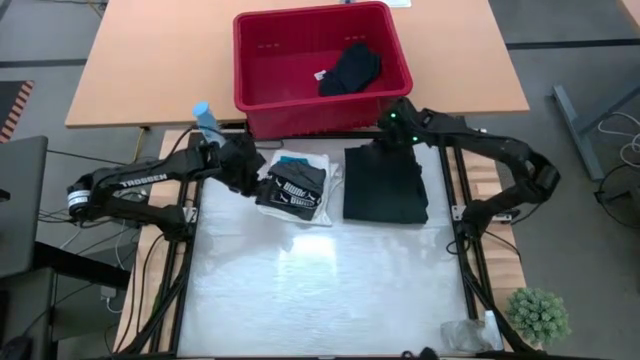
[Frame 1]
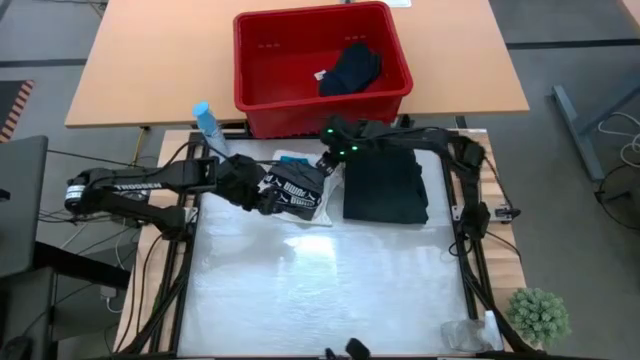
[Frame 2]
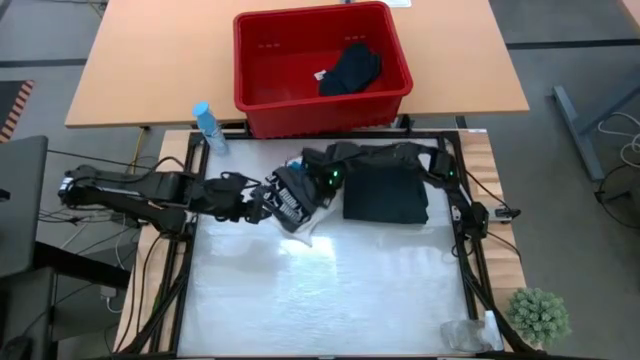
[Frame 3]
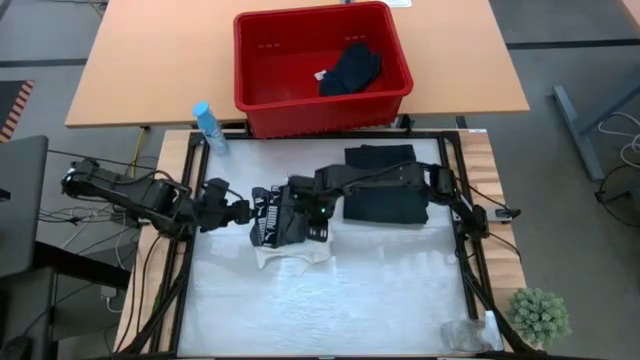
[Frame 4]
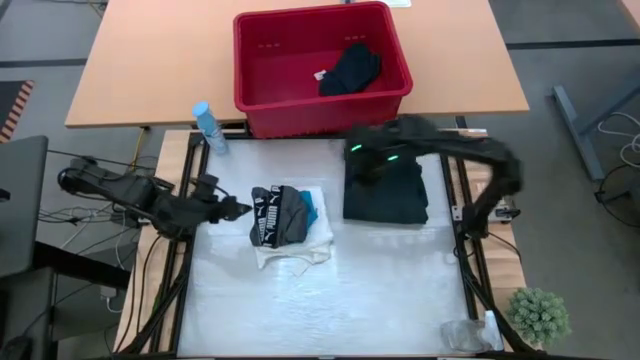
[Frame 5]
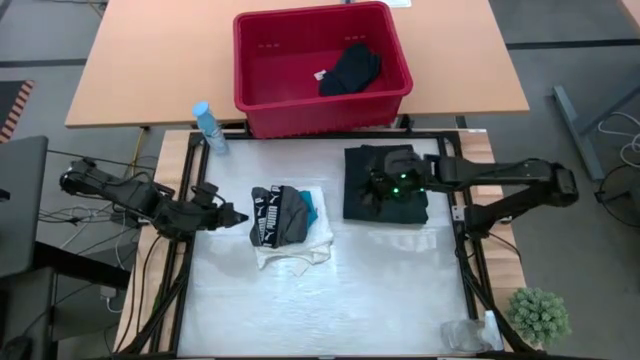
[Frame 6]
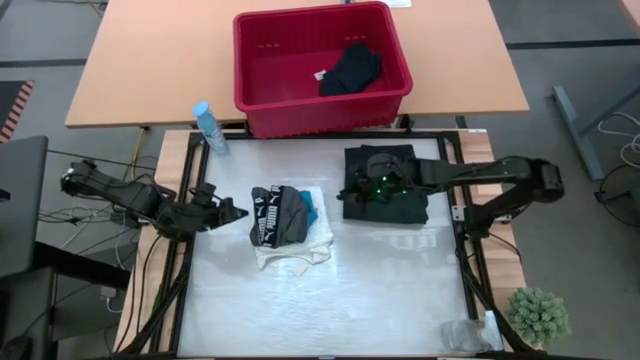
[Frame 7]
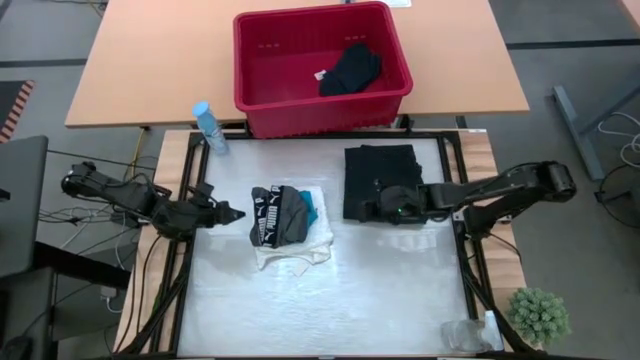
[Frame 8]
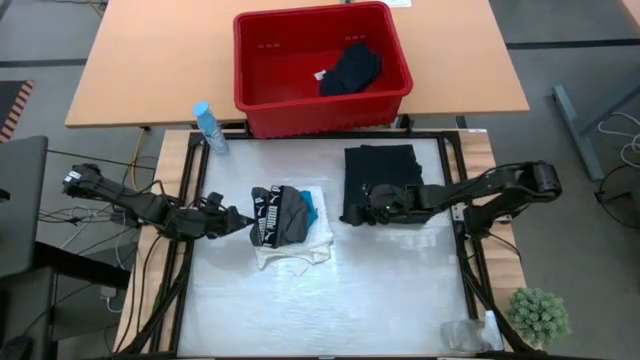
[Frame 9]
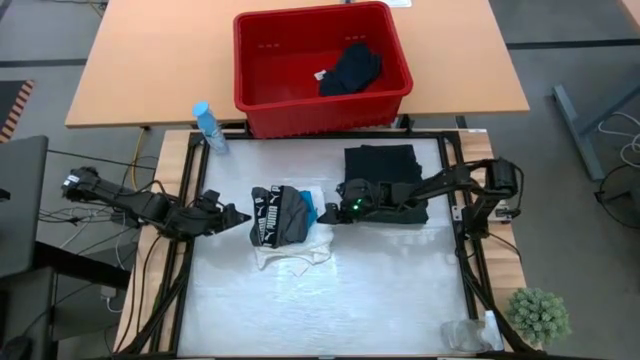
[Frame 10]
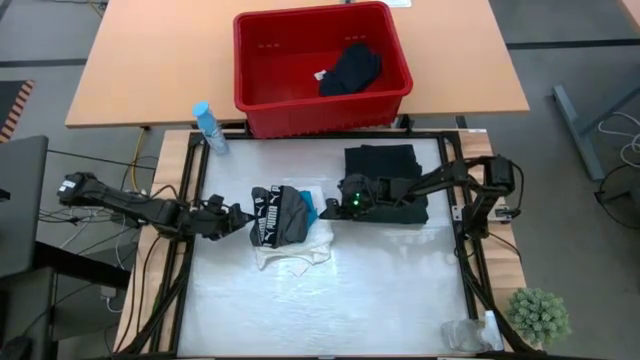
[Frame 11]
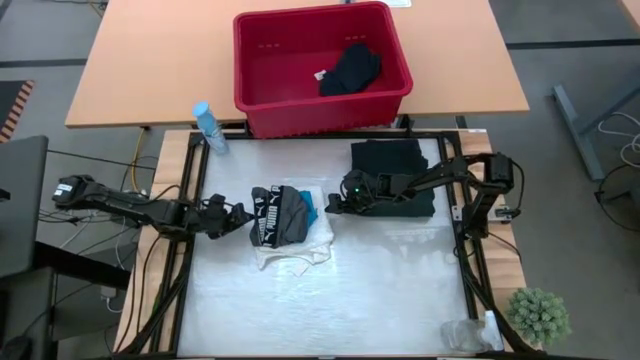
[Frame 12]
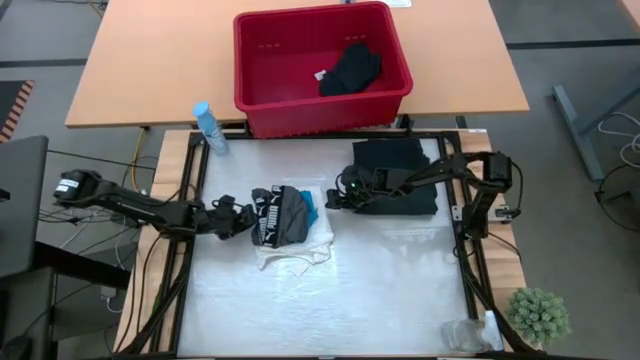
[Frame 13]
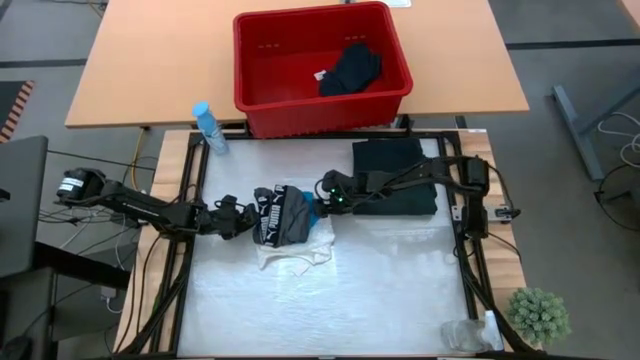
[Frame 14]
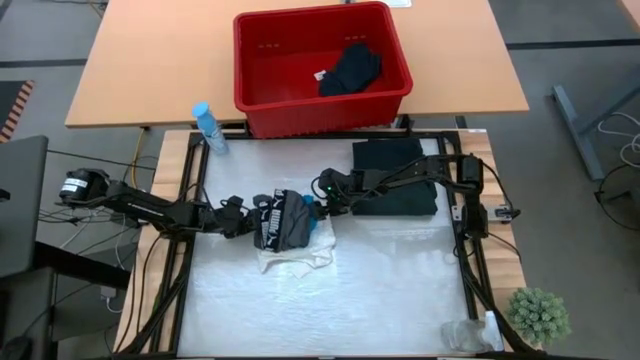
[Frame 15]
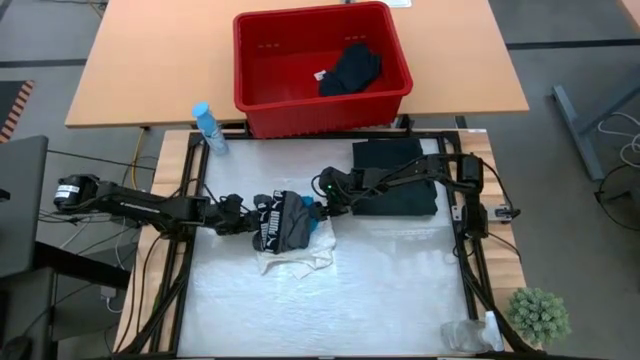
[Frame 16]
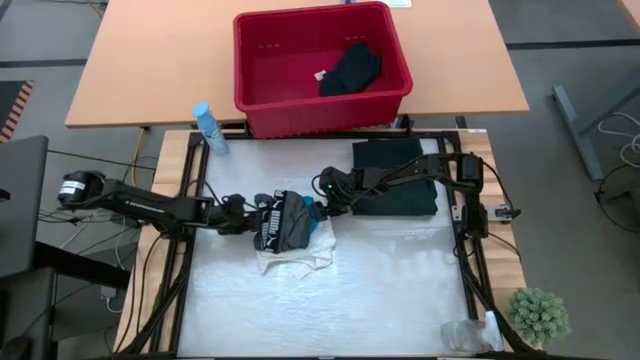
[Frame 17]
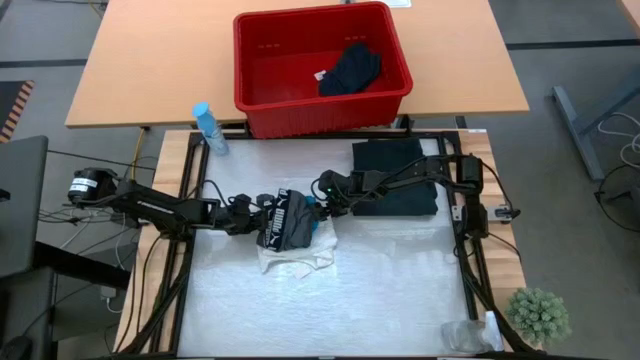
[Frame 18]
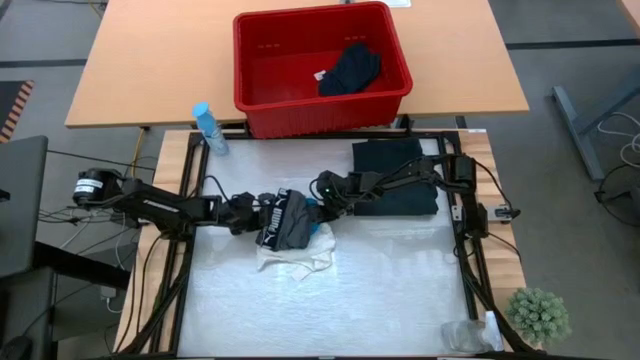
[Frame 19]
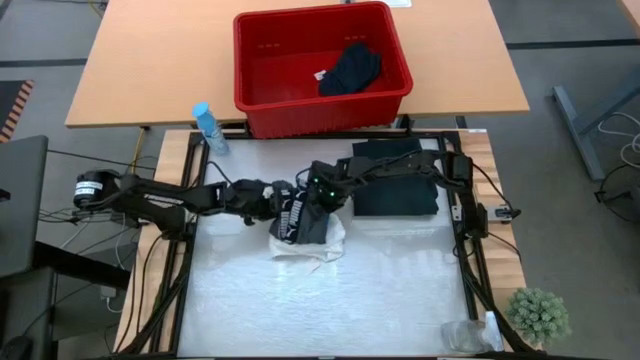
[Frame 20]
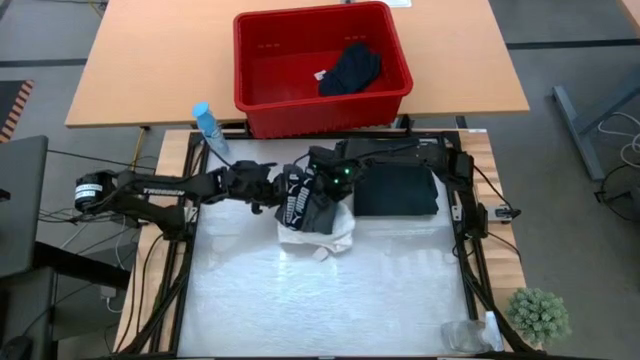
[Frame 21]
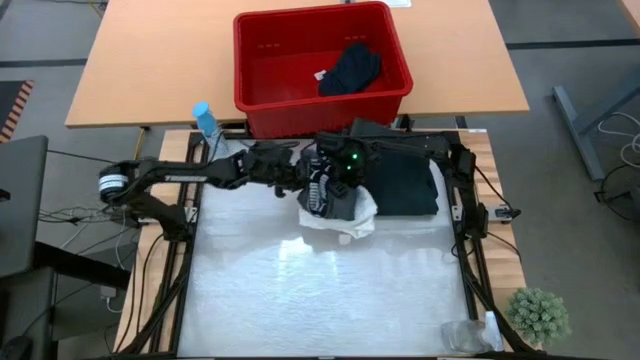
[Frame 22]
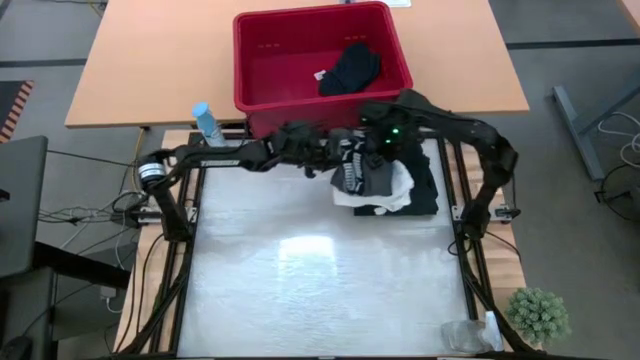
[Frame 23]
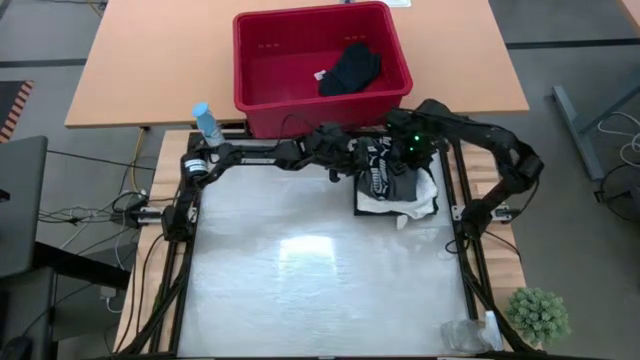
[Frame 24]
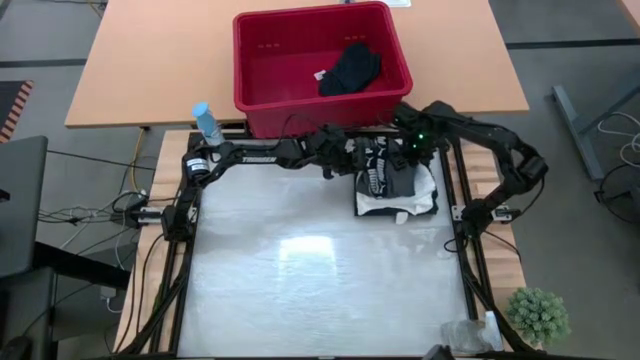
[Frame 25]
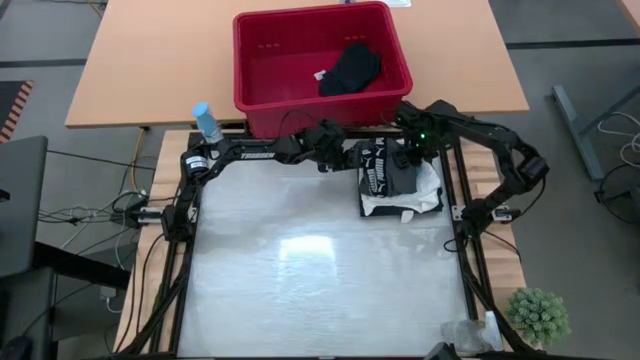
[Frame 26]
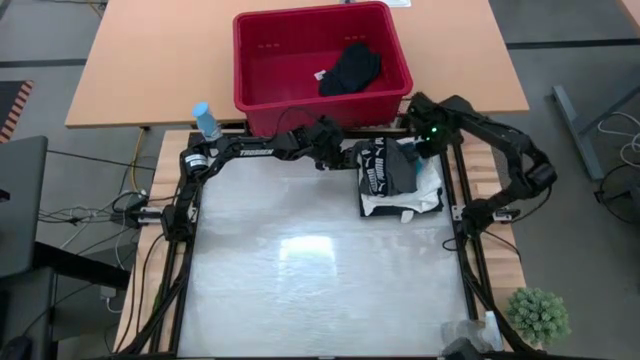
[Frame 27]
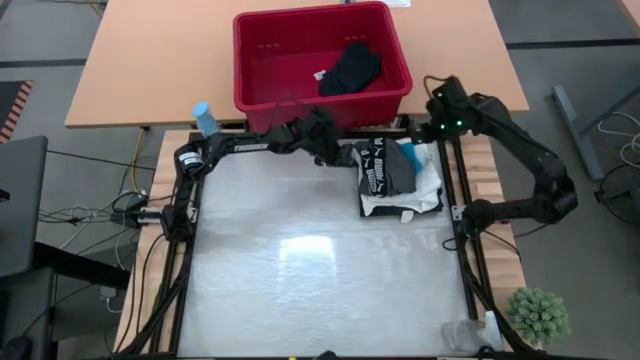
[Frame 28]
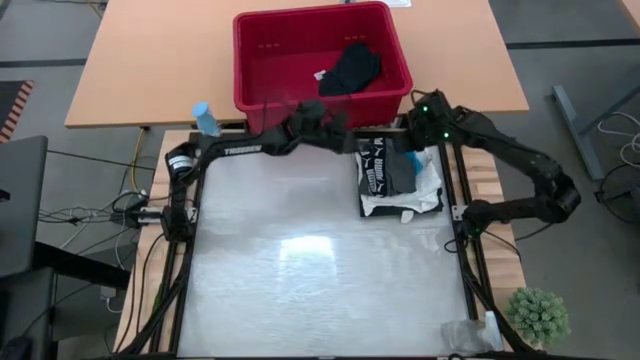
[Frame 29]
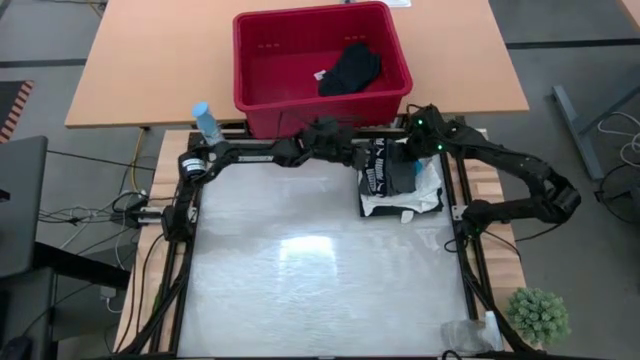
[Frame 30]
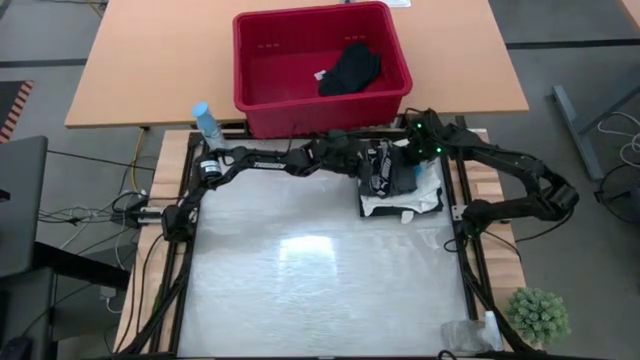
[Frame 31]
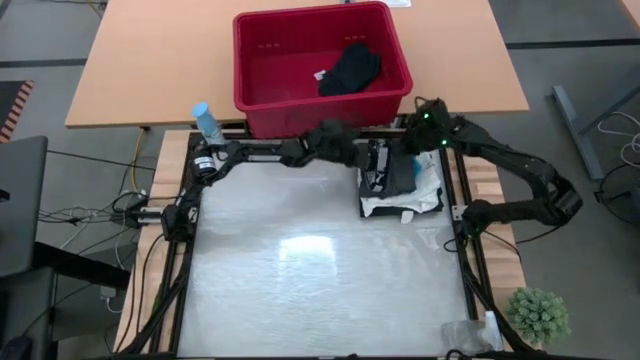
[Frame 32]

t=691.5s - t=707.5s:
Task: Fold laundry
Stack the clothes on the blue pants

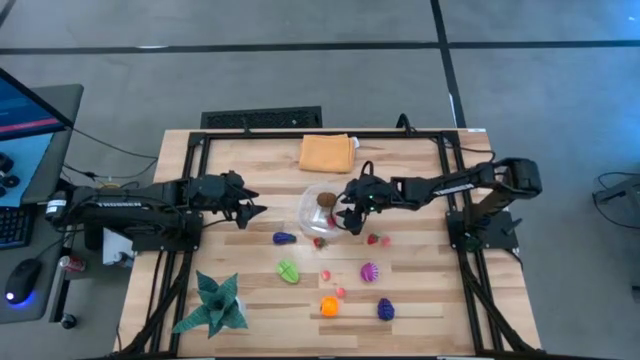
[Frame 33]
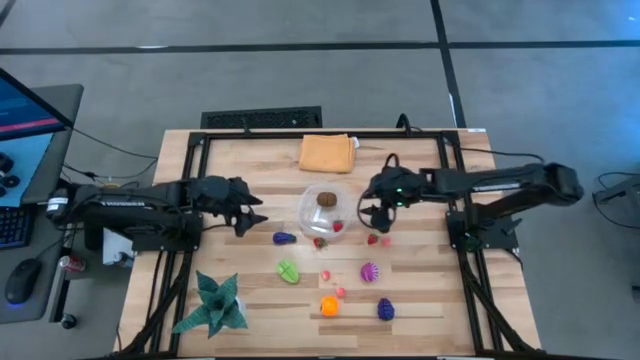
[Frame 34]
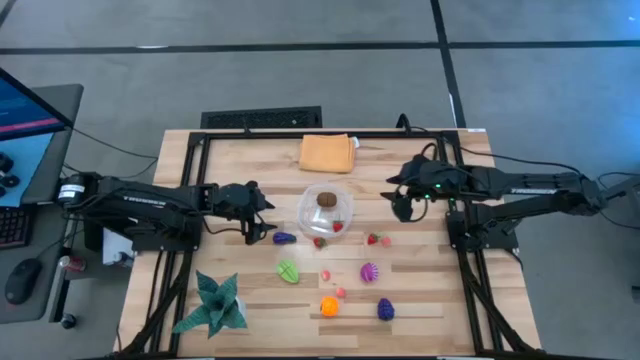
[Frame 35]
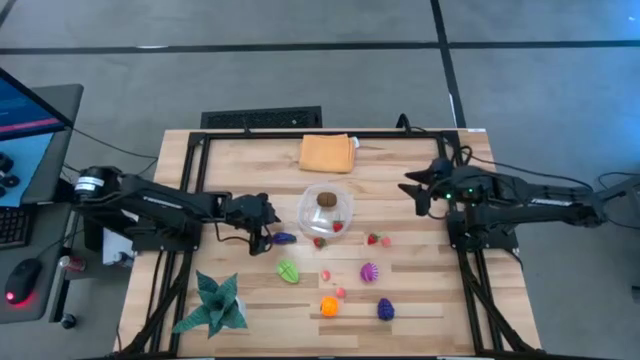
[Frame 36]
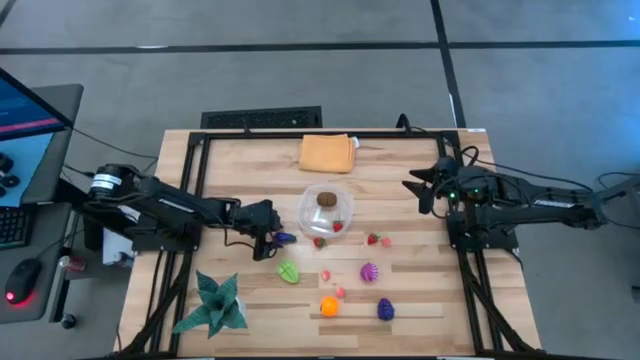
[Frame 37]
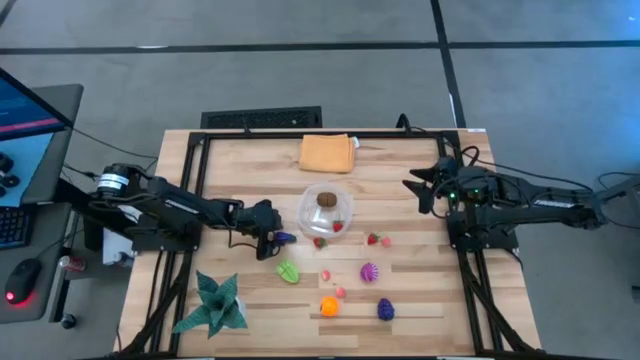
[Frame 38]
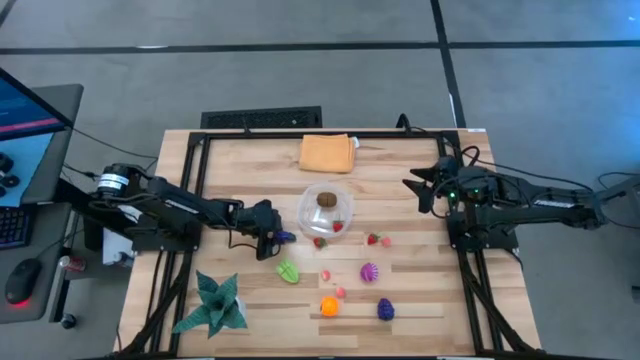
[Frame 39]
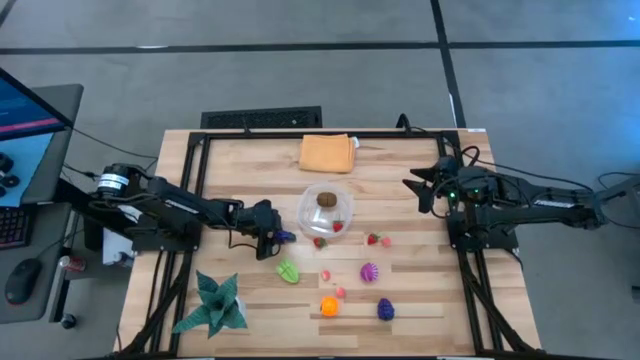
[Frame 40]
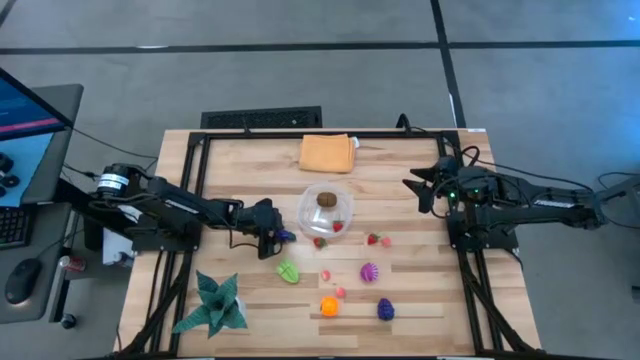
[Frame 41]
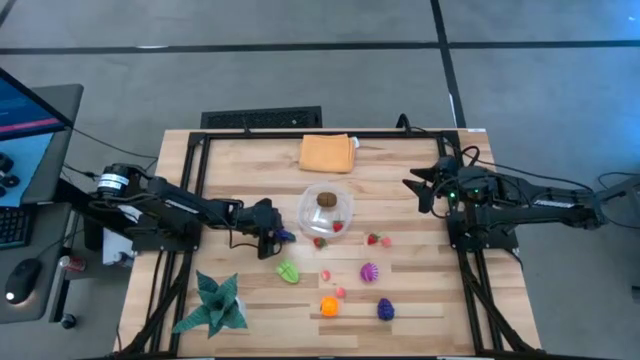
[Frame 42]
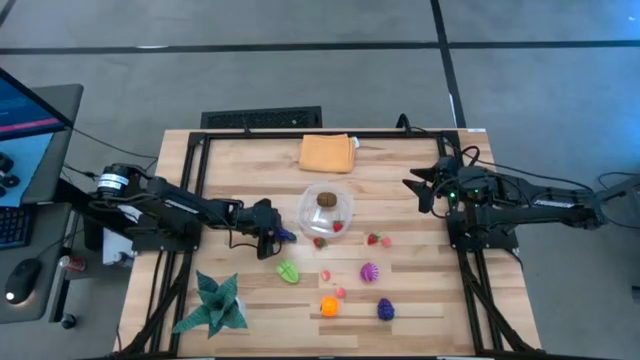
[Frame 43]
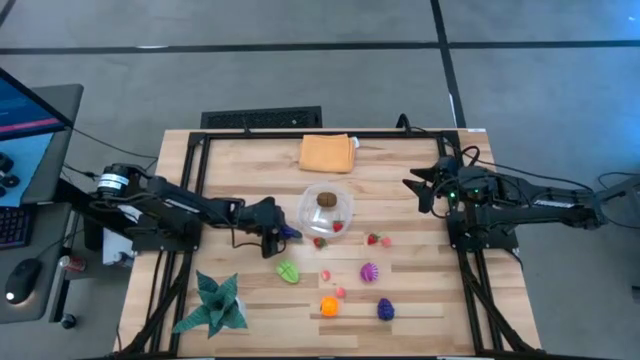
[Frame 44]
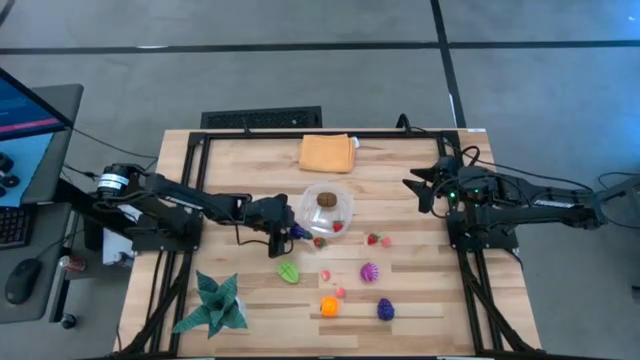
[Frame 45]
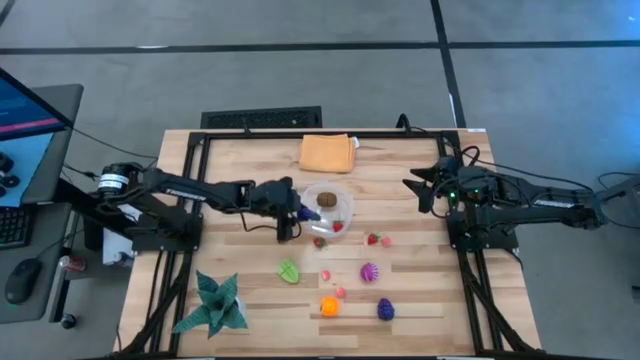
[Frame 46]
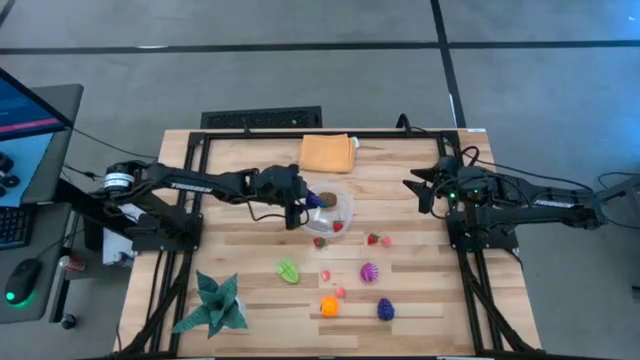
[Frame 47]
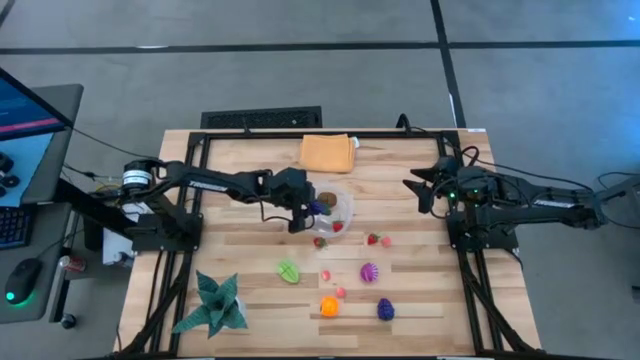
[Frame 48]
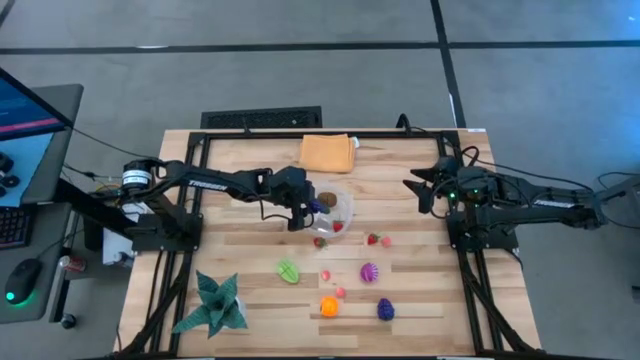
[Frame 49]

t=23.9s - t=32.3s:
Task: Pick and placing Produce into tupperware
Put the violet eggplant into the transparent container
